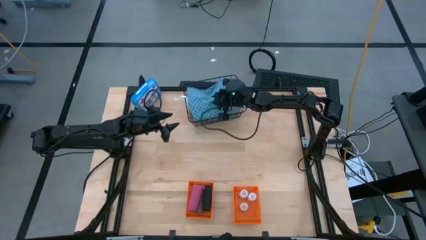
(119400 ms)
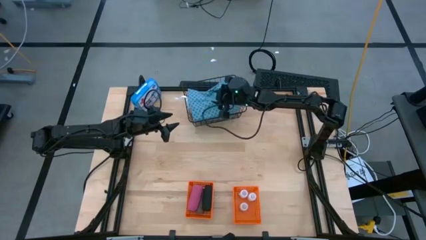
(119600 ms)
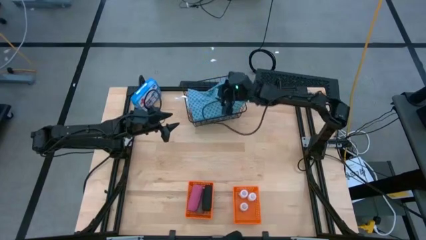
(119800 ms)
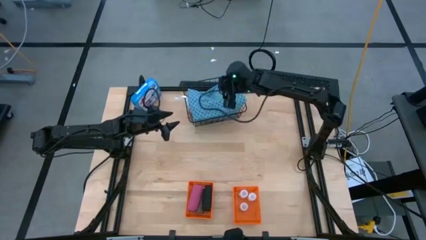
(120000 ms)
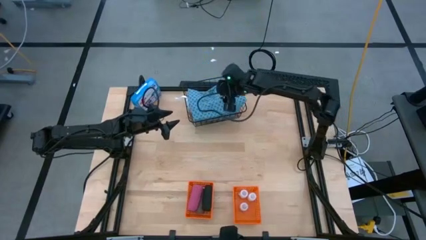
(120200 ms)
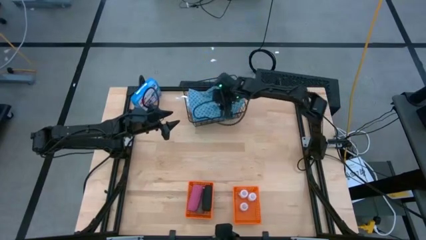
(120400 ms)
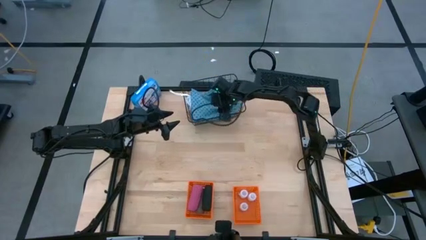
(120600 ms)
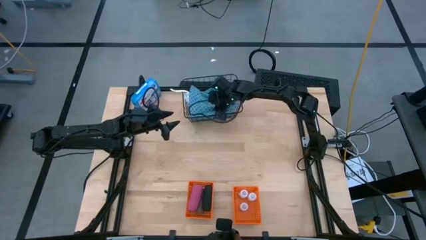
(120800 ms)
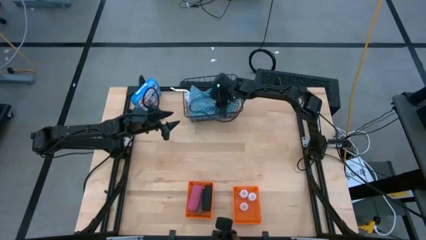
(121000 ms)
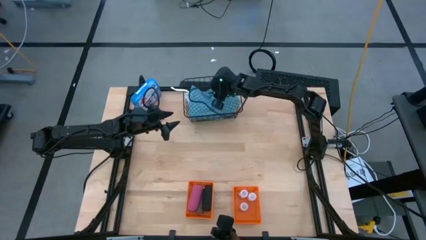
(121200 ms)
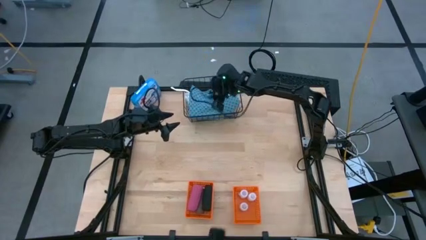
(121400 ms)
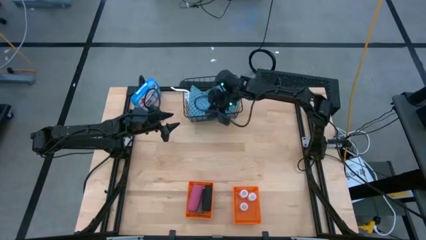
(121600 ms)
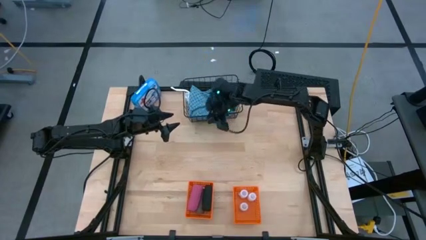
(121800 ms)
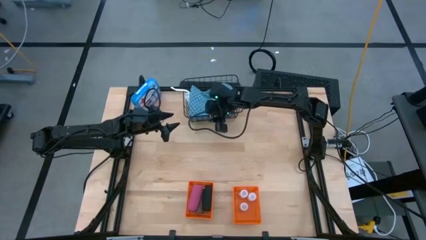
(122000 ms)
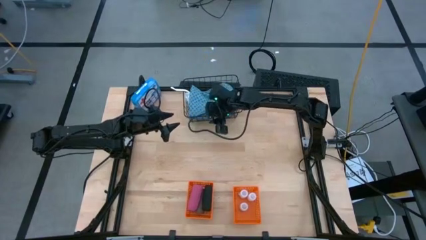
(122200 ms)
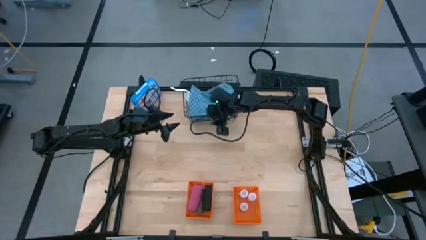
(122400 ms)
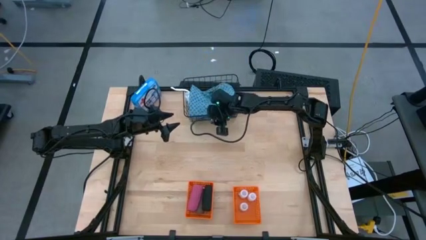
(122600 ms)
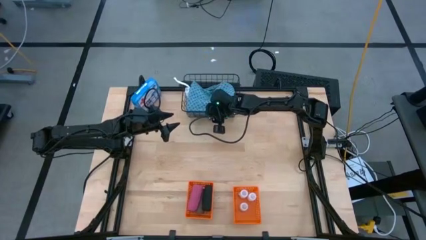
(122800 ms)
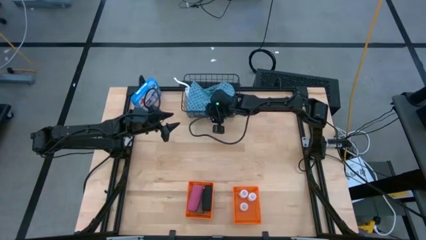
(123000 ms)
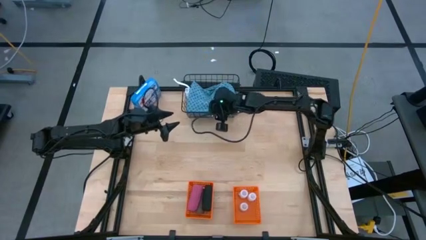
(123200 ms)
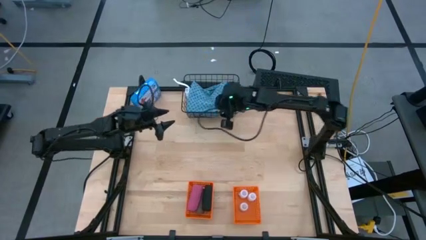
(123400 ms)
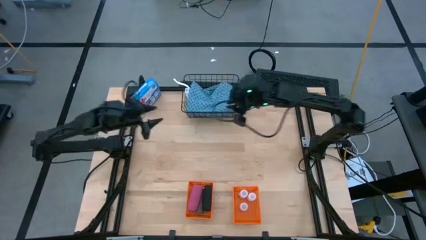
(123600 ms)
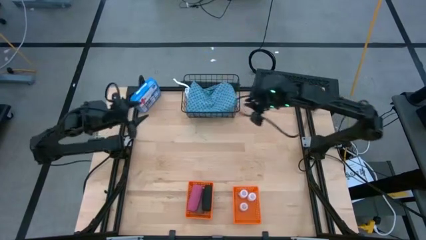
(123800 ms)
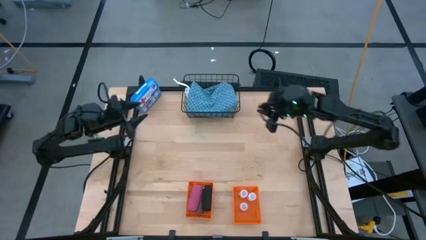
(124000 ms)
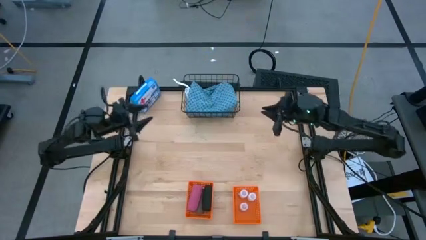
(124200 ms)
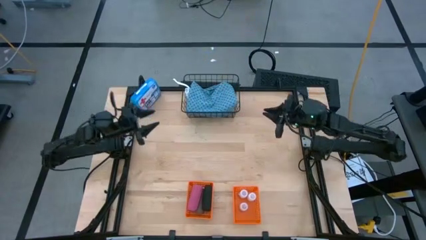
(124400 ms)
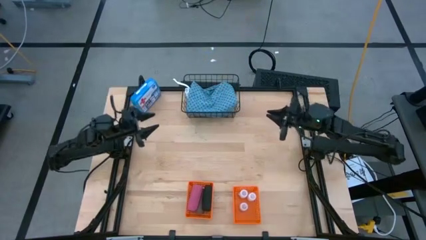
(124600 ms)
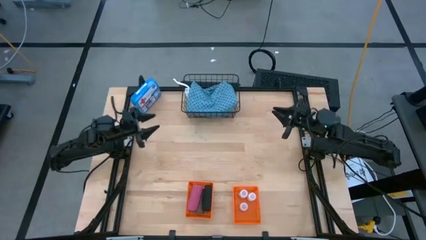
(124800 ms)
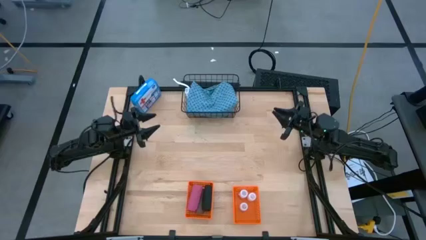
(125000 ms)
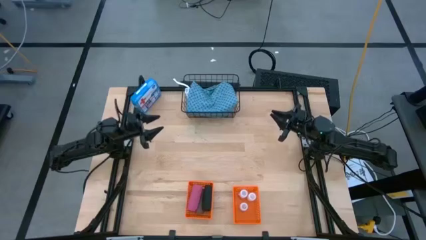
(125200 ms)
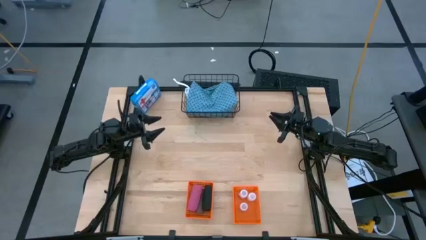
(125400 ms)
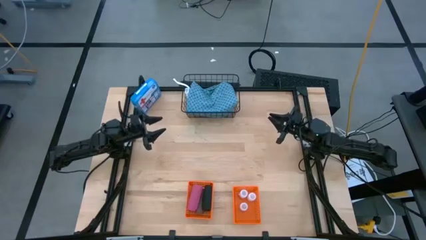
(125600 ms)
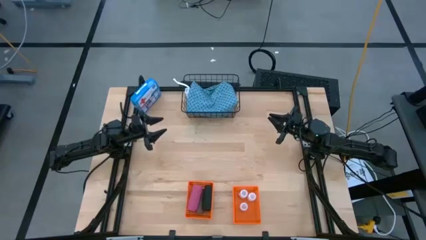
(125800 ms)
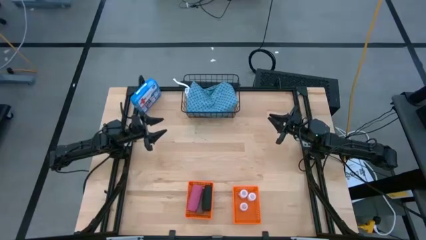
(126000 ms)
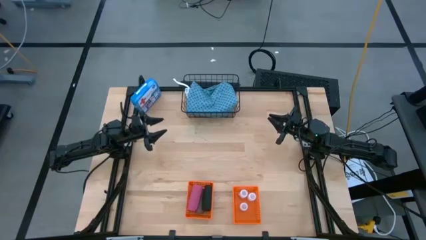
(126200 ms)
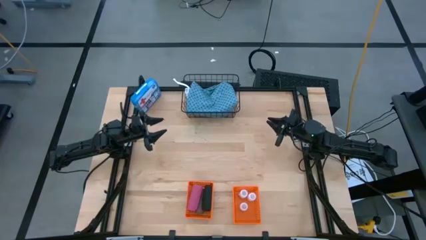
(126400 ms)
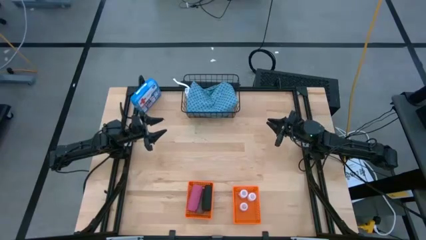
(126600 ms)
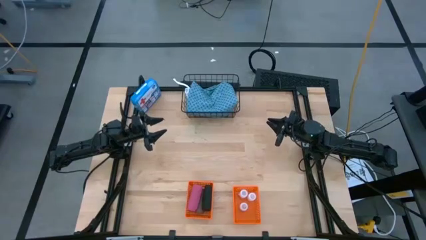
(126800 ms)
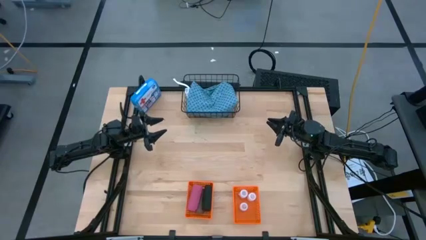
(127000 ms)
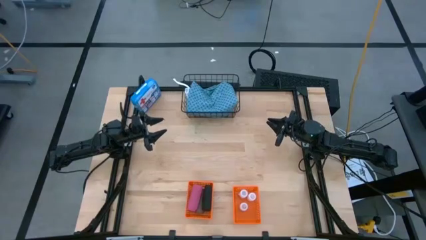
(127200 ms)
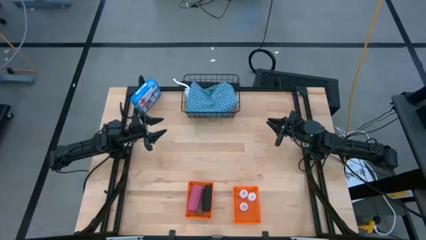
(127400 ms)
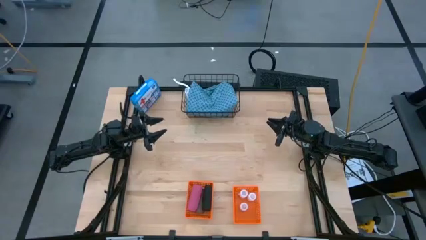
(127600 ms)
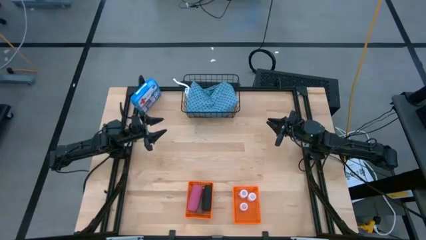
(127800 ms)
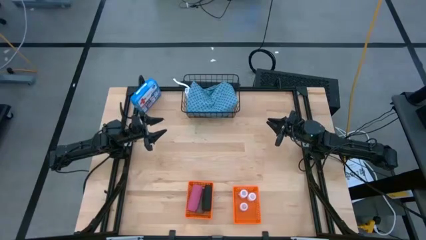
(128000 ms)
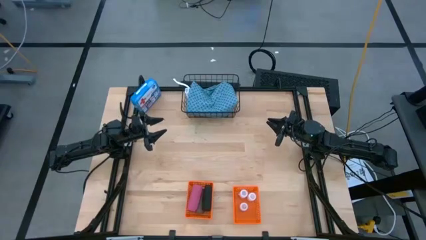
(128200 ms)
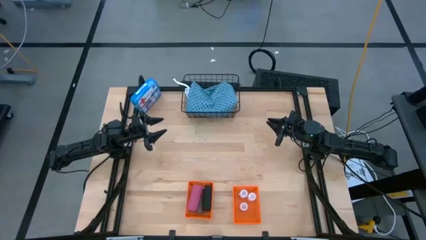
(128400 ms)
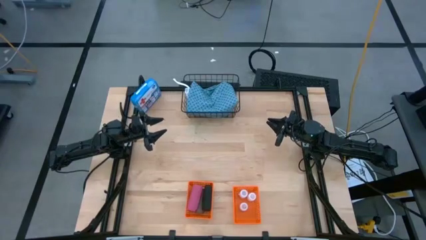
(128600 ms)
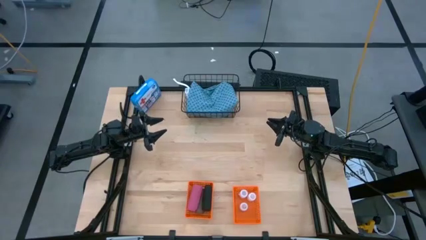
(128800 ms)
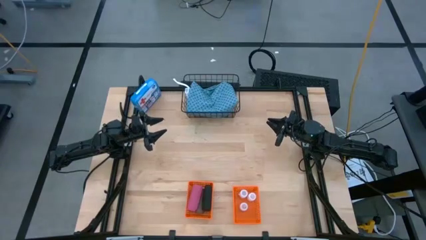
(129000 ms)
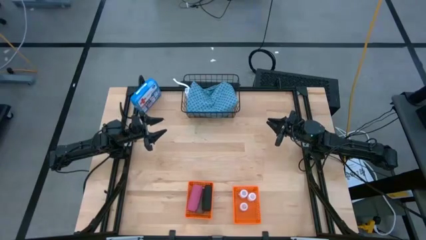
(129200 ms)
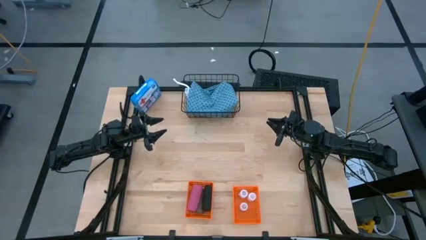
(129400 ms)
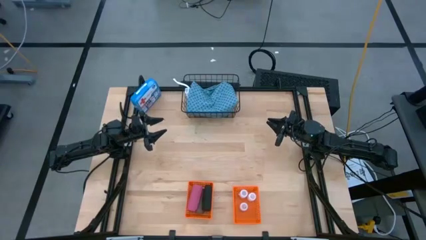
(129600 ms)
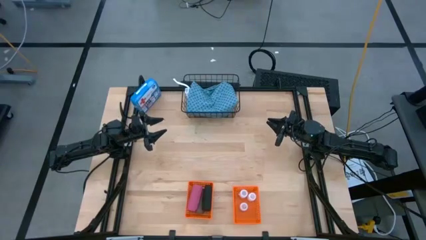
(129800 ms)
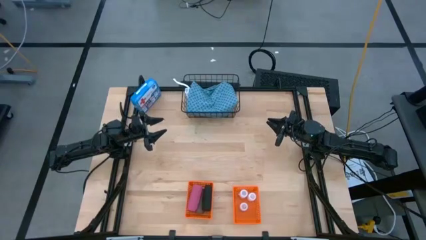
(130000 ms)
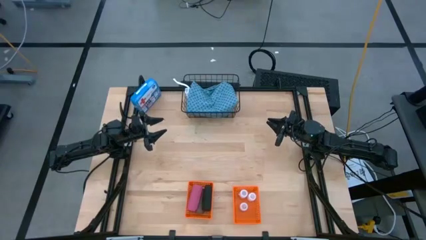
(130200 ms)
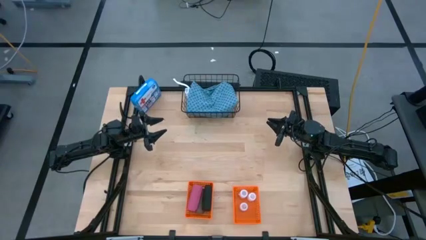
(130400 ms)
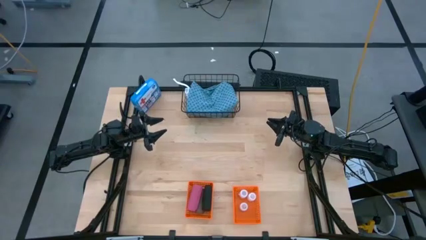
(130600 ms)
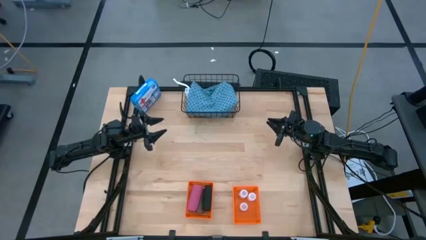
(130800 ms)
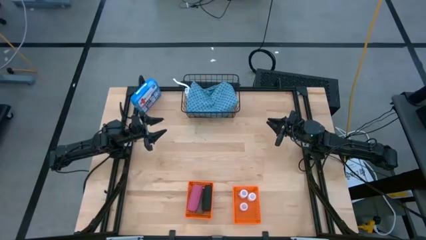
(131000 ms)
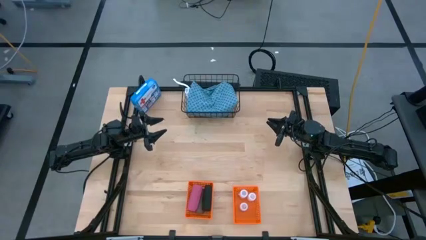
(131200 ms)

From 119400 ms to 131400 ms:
Task: Pick & Place Medicine items
Return to Home Position
